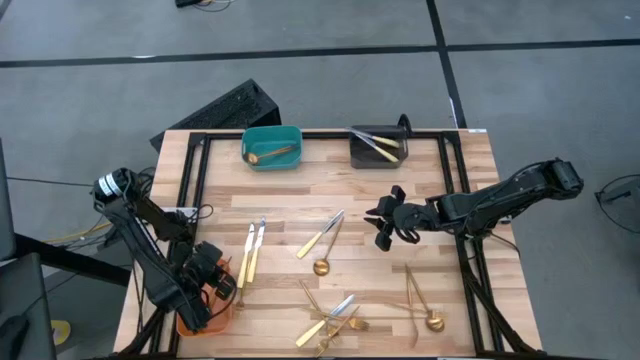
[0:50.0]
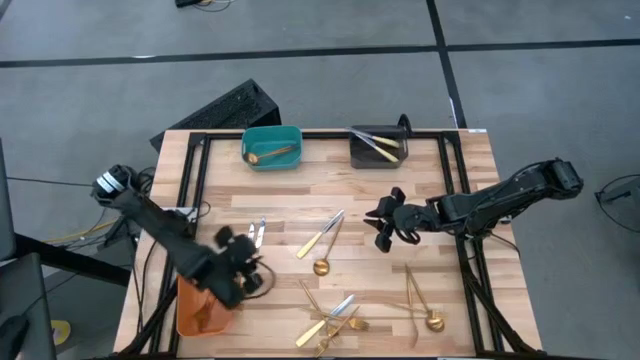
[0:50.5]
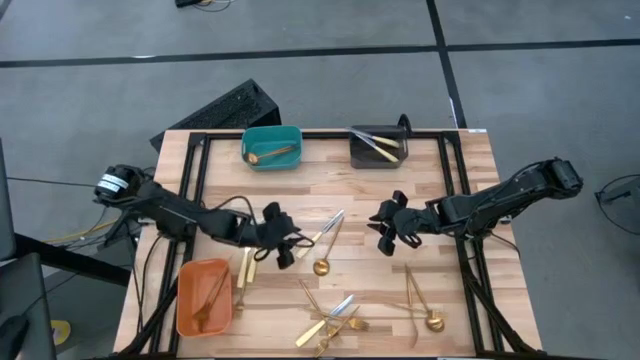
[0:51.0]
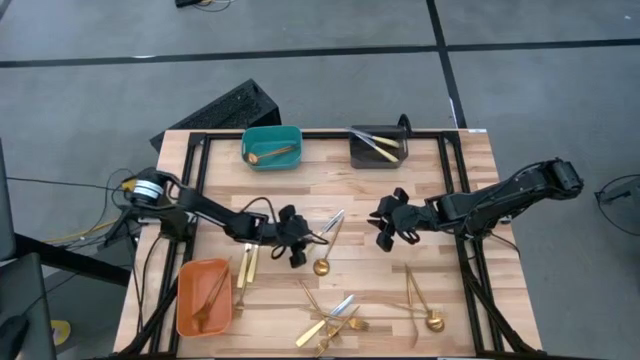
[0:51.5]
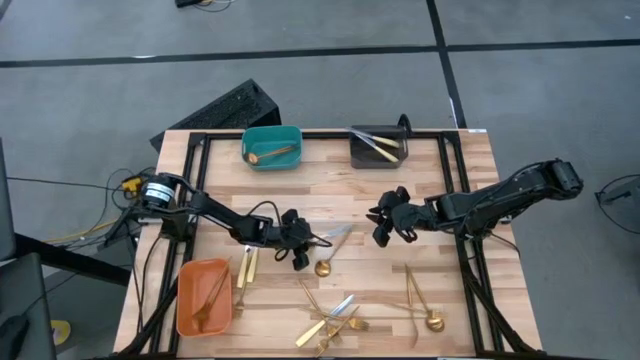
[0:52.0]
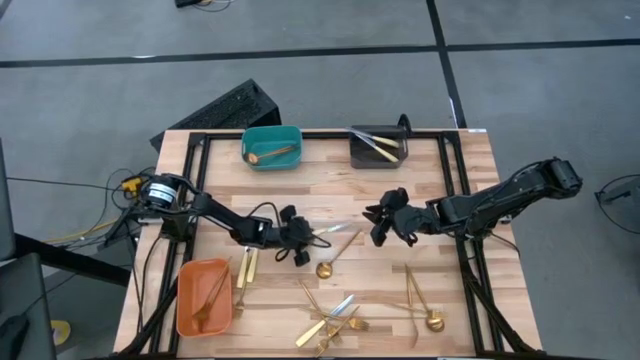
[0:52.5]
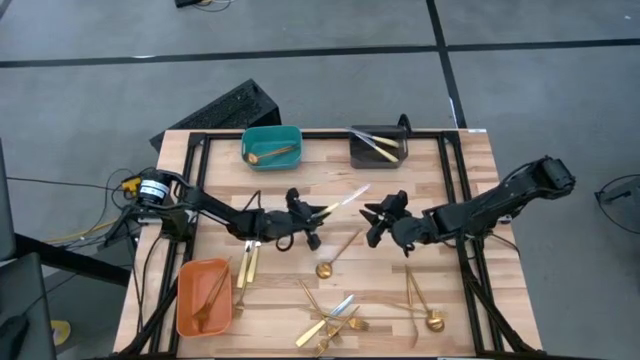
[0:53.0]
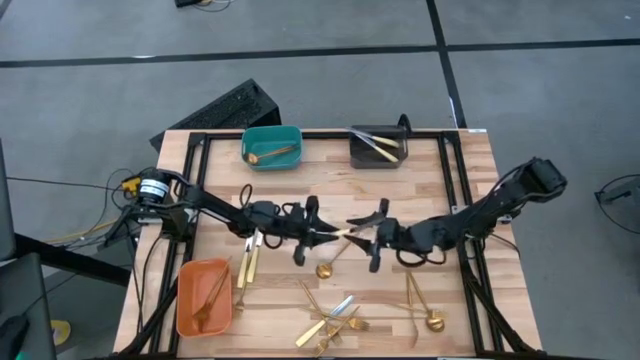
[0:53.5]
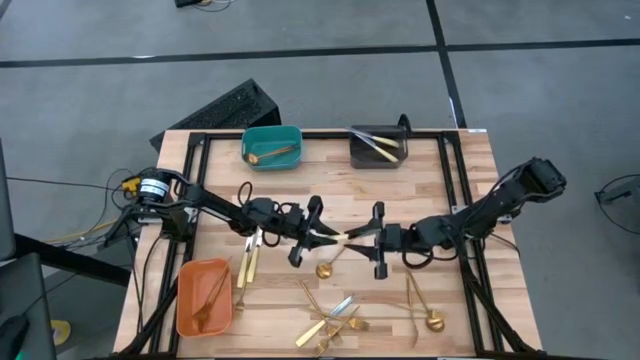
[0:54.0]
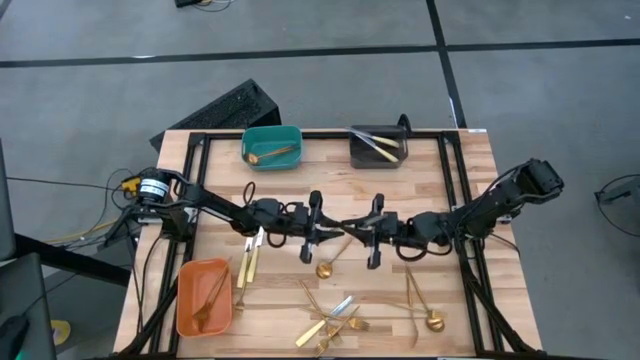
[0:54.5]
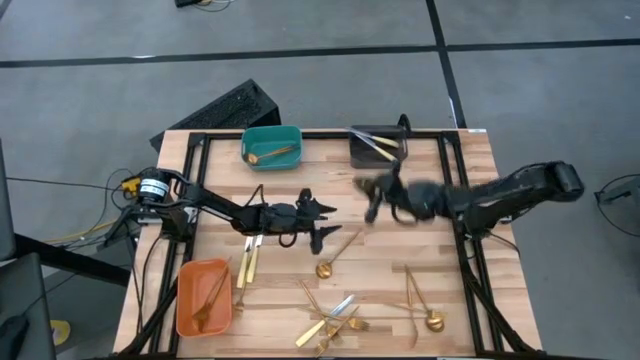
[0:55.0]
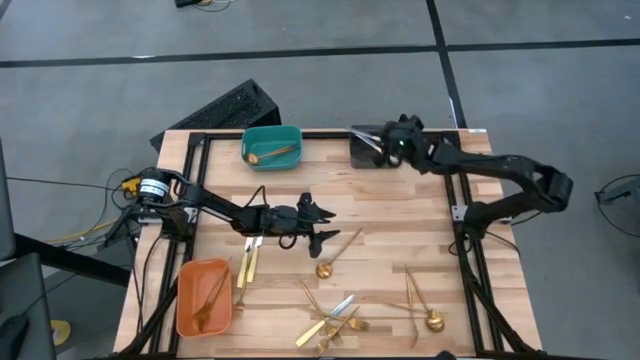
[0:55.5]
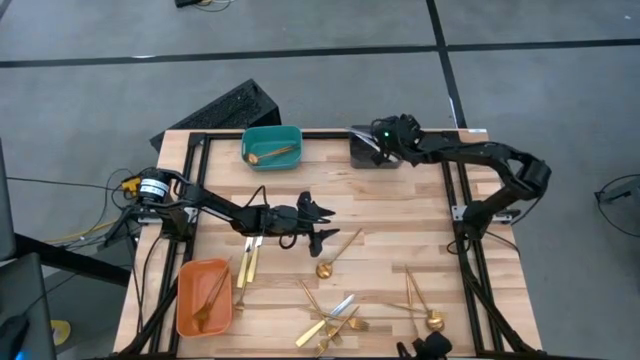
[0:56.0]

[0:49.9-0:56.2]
Task: Sort silverware by color (type)
Put the yellow knife into the black bin

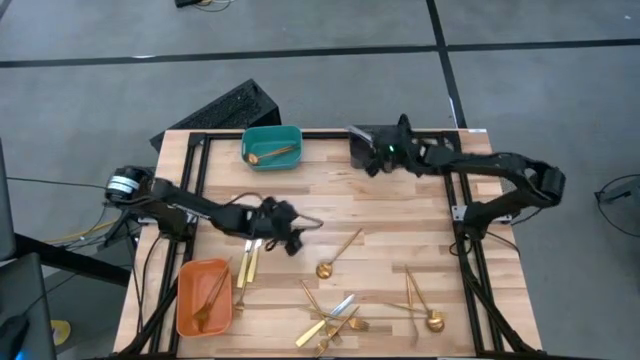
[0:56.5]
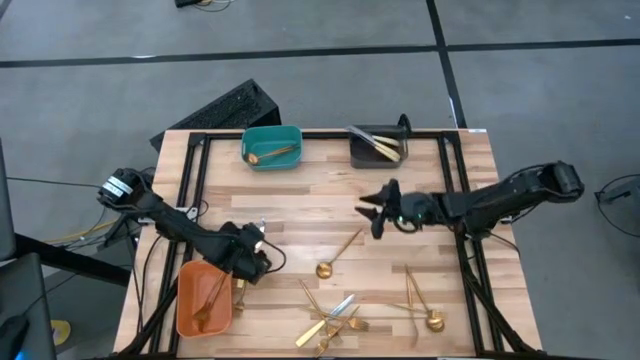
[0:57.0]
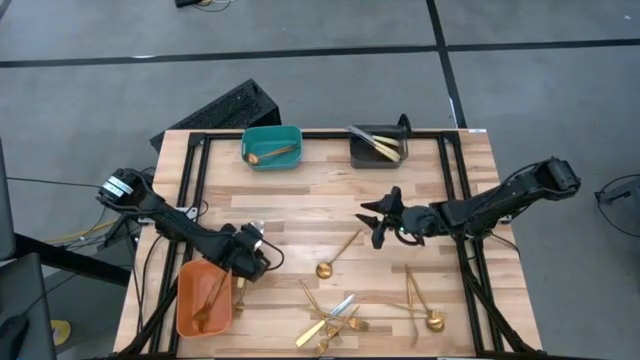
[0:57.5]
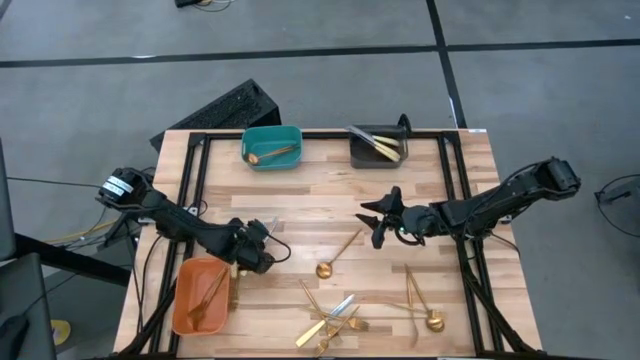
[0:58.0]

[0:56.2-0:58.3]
Put the yellow knife into the black bin

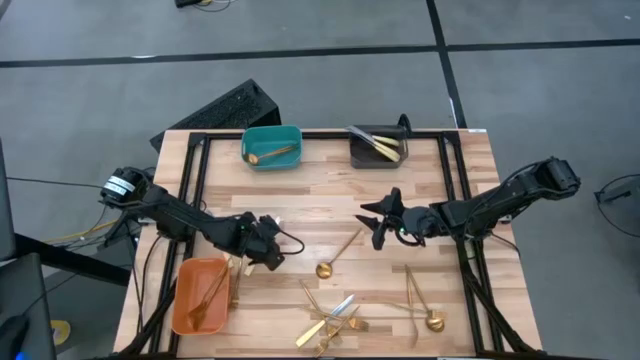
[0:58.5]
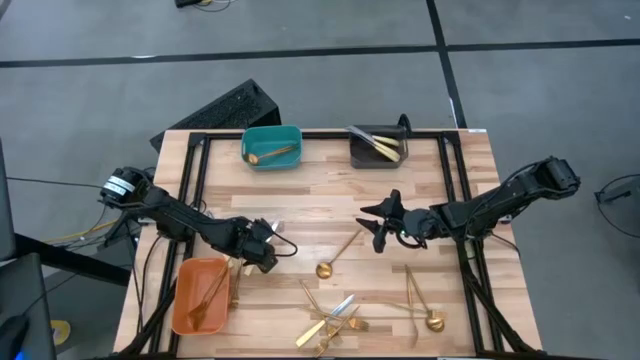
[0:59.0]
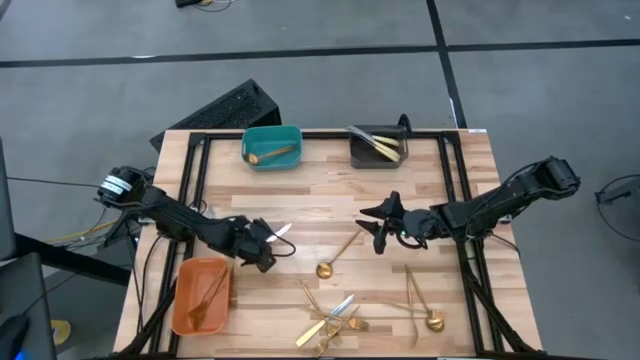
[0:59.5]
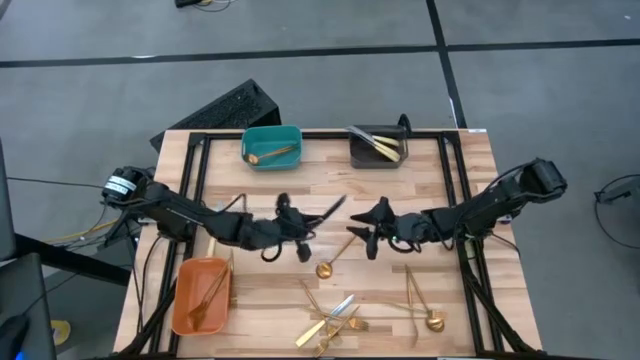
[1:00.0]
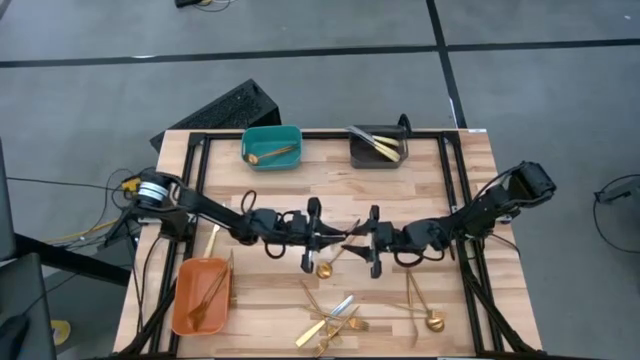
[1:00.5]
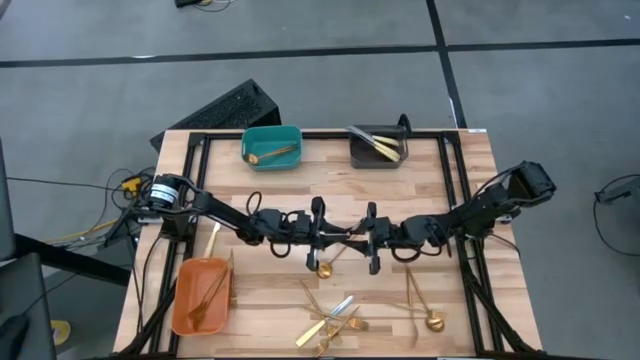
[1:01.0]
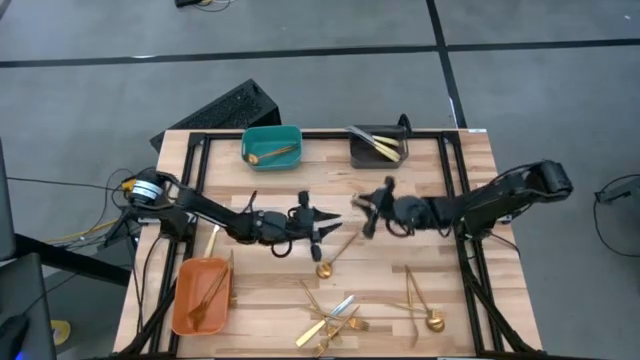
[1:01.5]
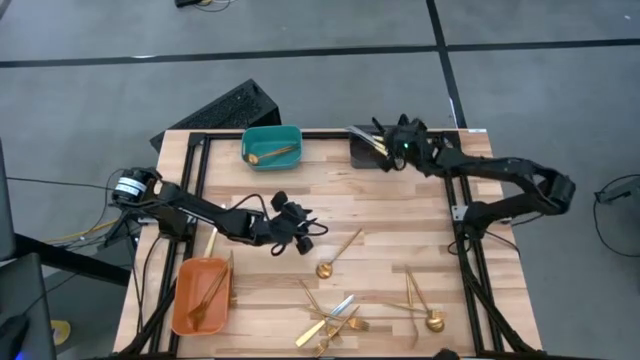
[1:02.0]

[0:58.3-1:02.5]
Put the yellow knife into the black bin

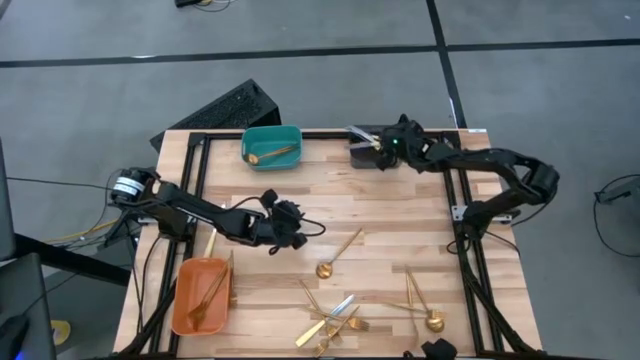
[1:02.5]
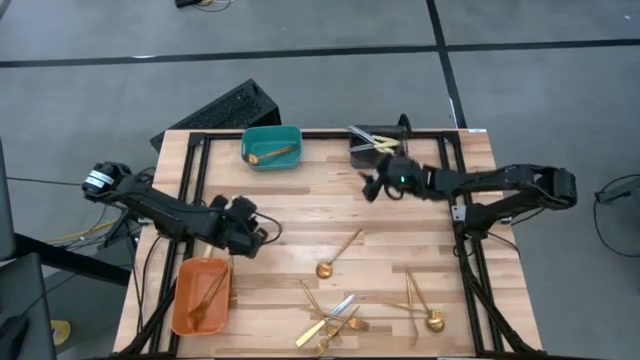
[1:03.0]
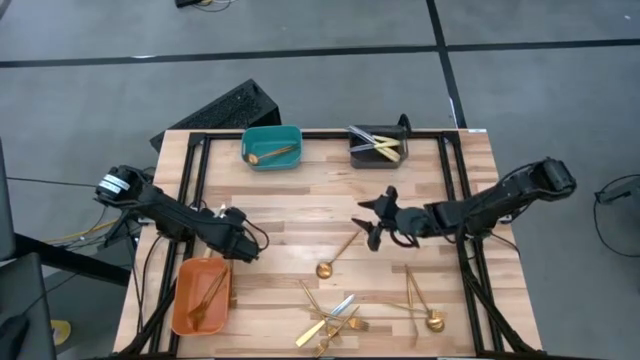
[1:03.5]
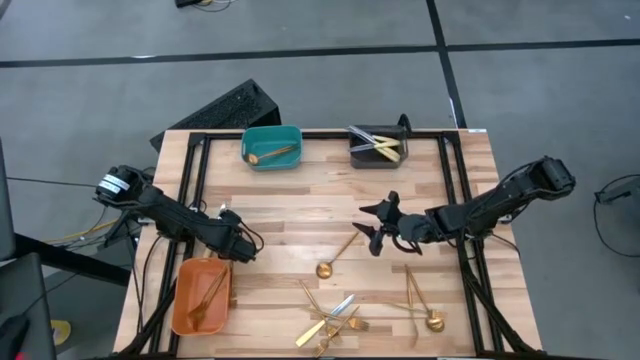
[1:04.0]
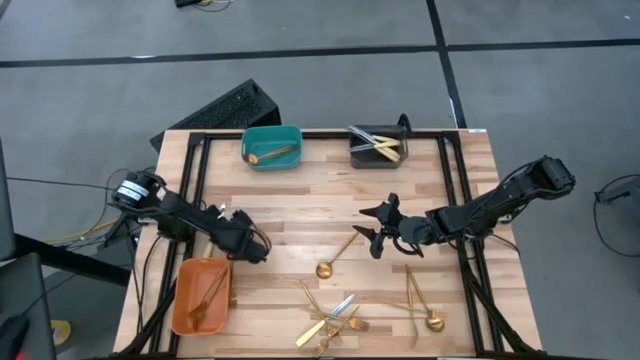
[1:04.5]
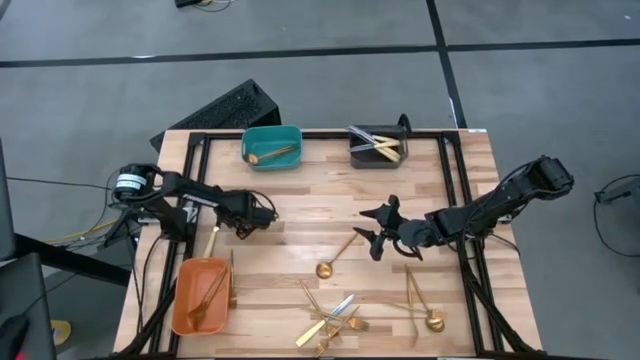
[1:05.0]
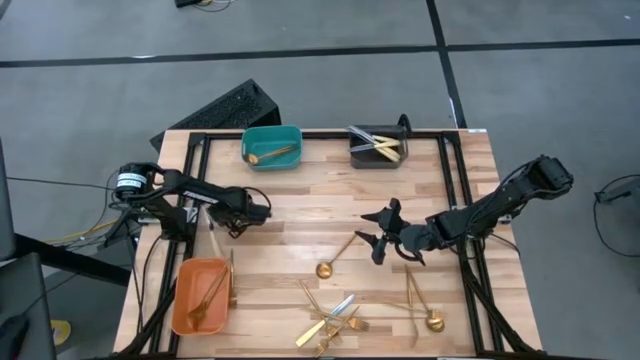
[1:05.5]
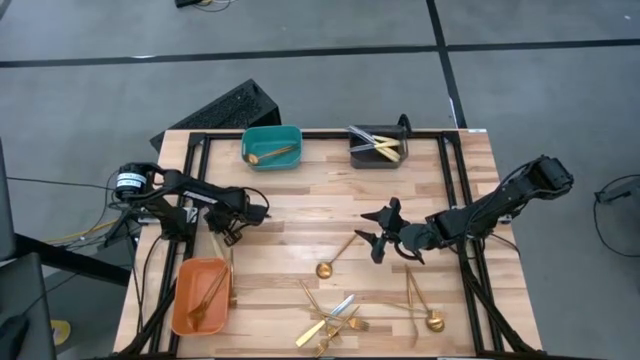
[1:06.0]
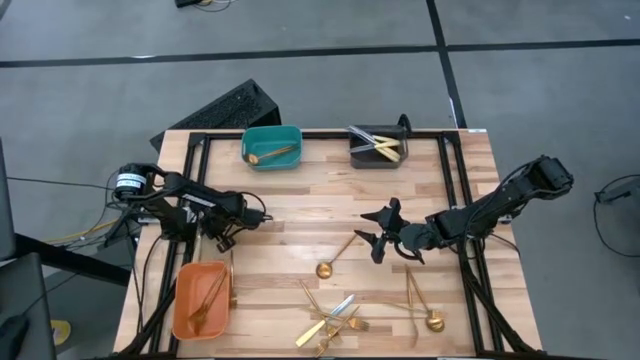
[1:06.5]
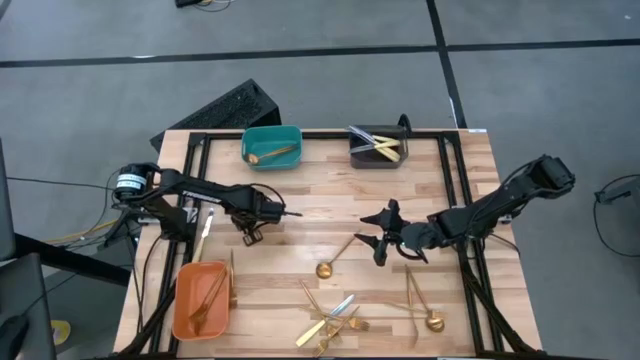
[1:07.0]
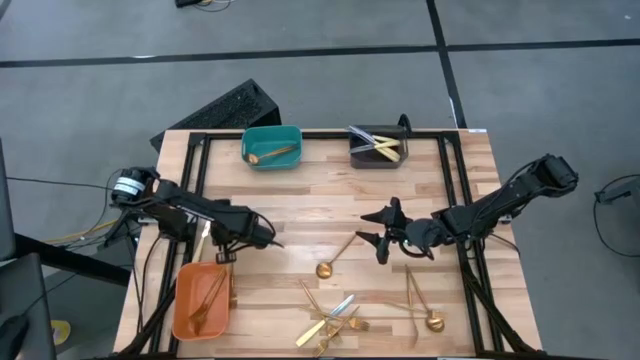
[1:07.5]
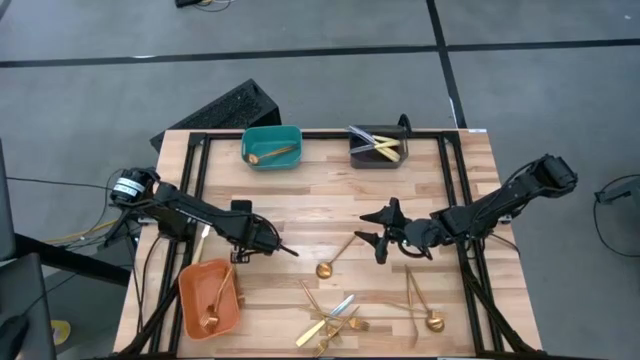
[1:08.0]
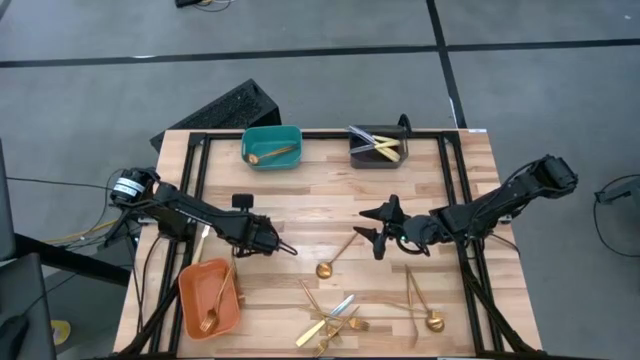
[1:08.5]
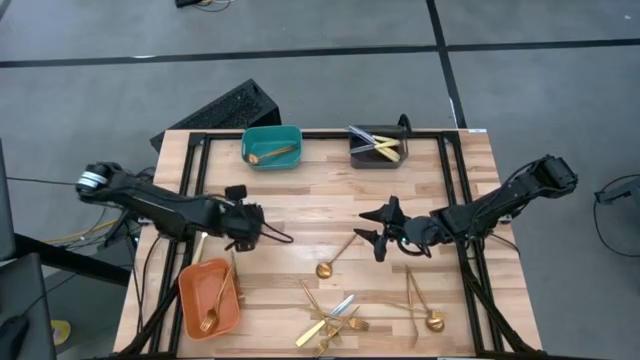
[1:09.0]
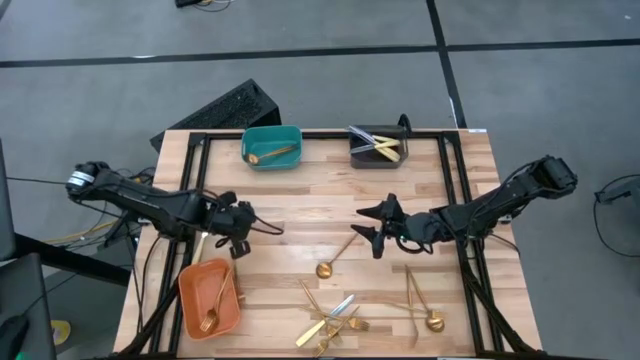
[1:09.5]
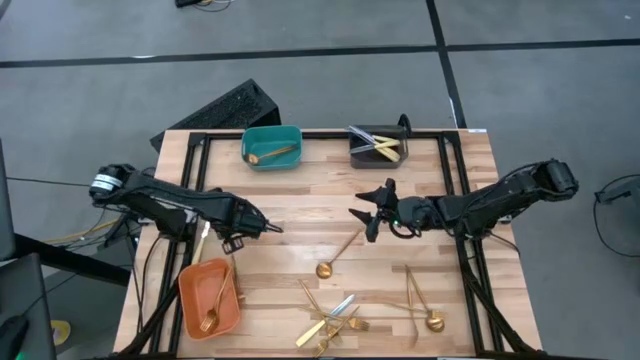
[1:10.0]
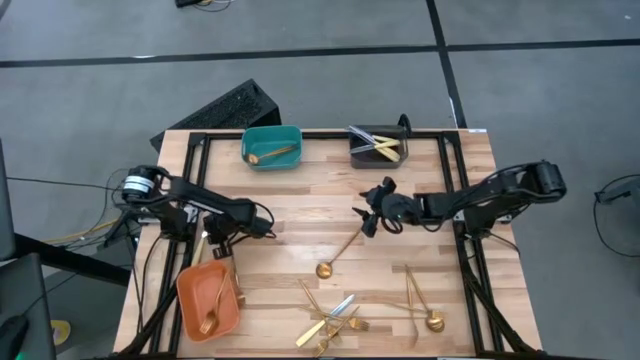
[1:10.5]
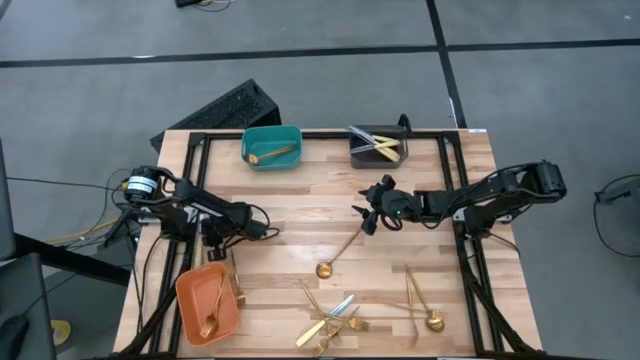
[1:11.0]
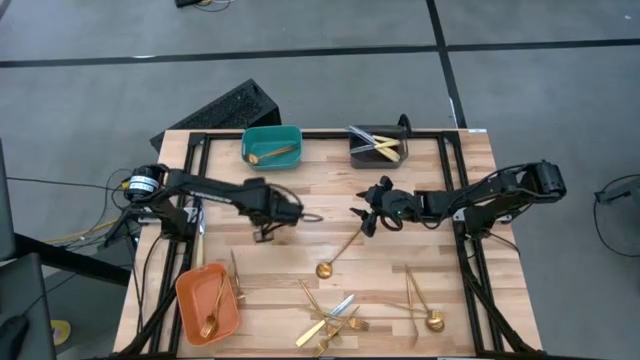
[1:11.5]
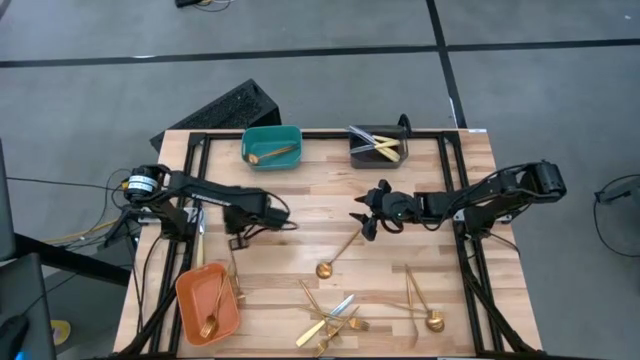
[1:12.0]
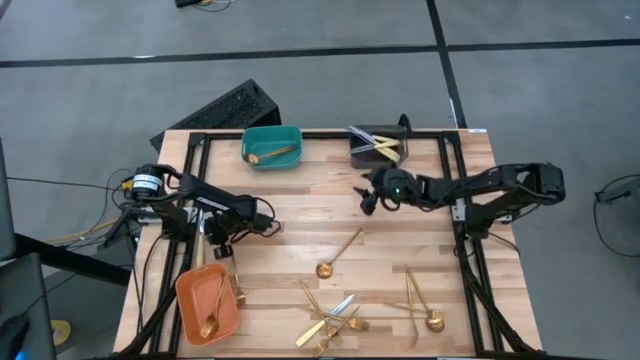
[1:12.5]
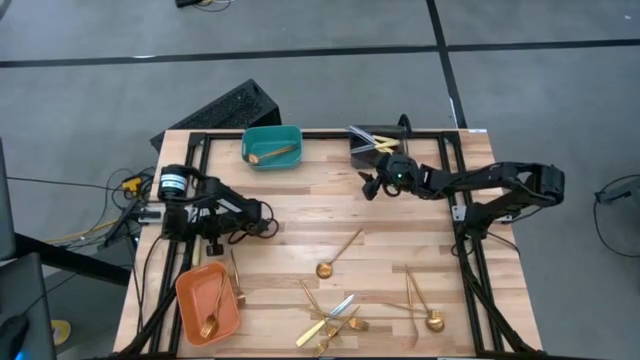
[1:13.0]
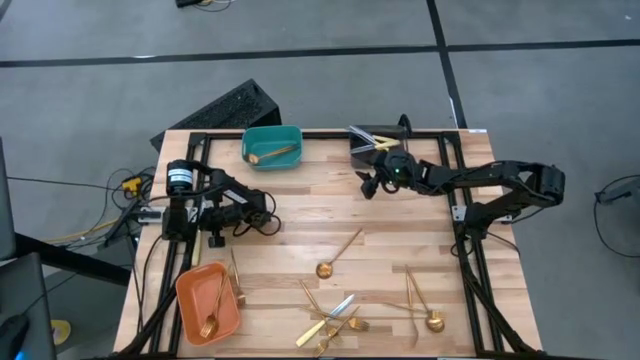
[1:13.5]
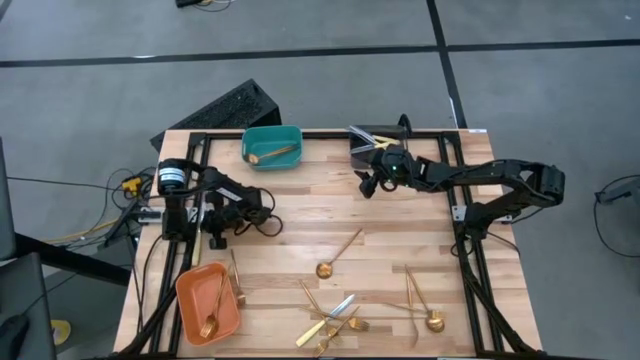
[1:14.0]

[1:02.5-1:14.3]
Put the yellow knife into the black bin
